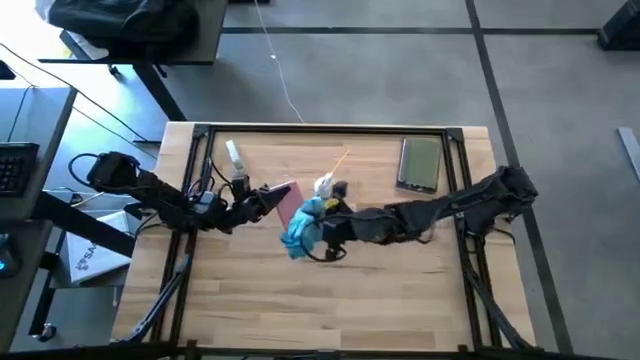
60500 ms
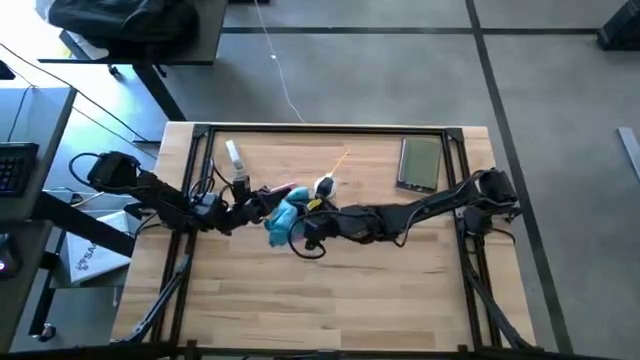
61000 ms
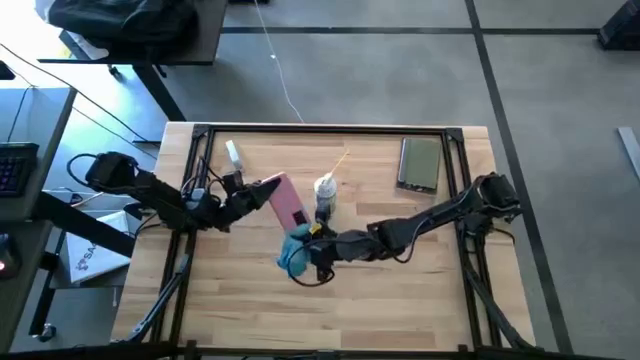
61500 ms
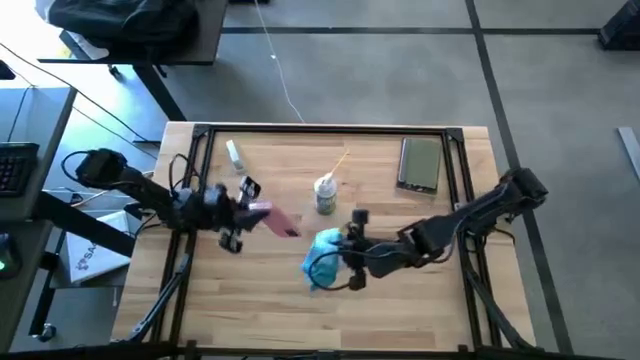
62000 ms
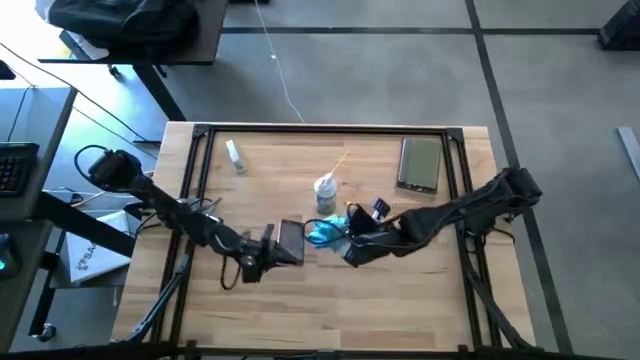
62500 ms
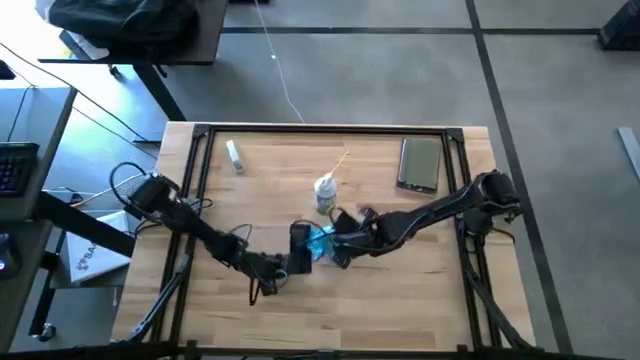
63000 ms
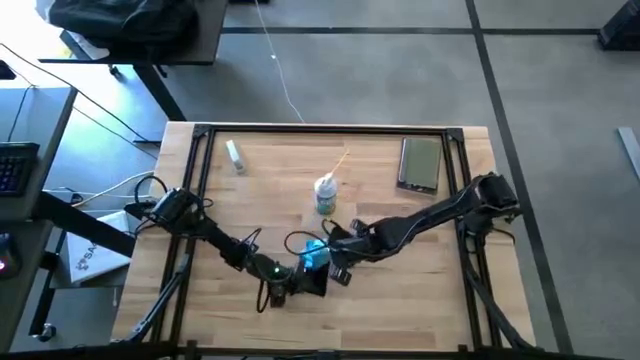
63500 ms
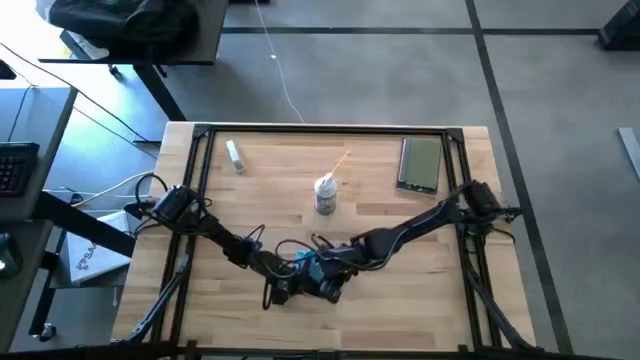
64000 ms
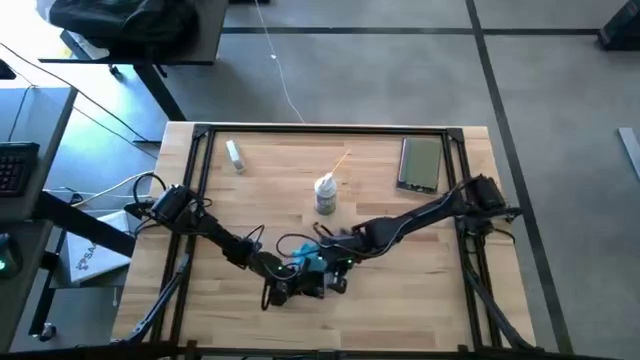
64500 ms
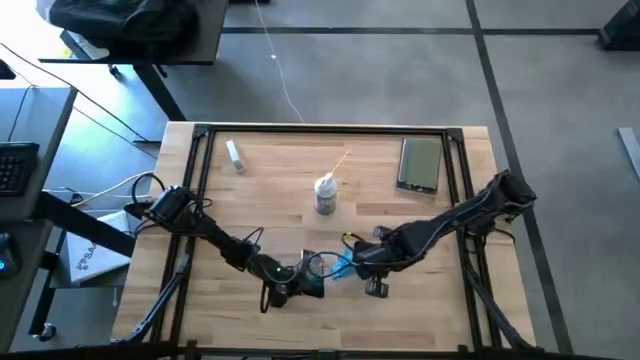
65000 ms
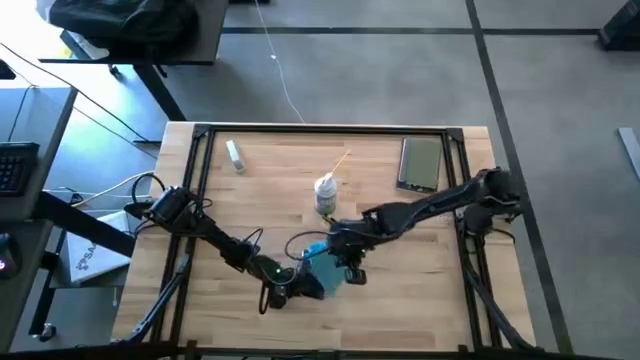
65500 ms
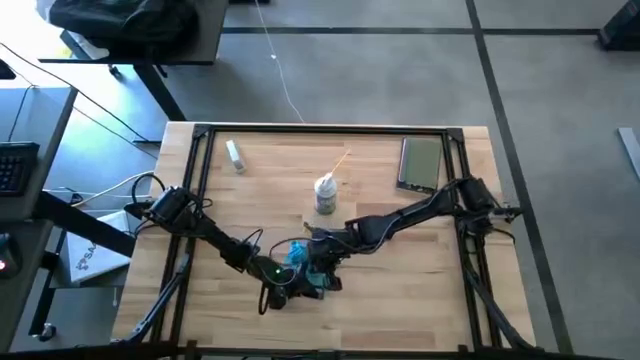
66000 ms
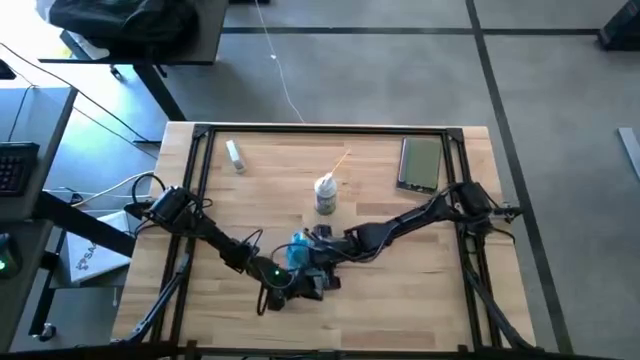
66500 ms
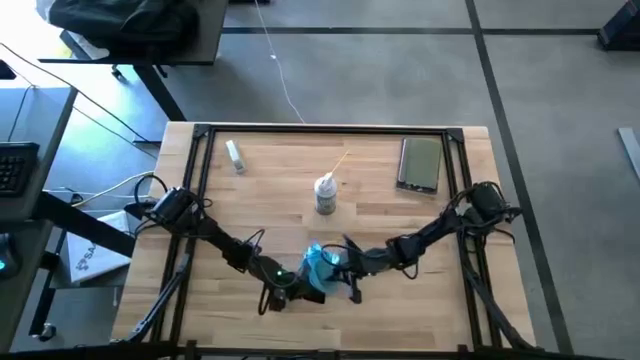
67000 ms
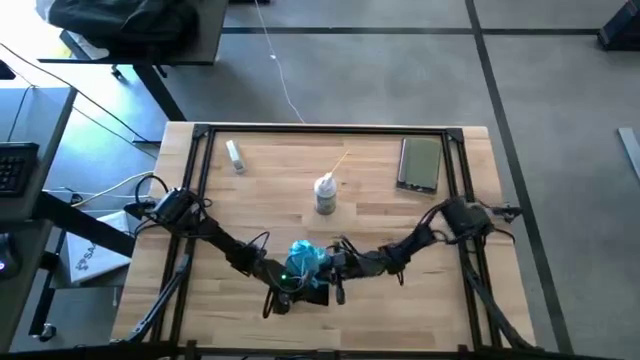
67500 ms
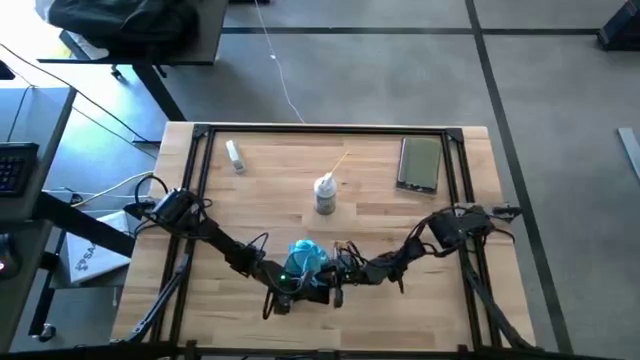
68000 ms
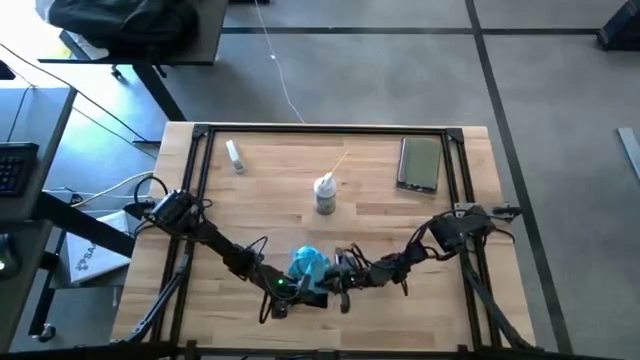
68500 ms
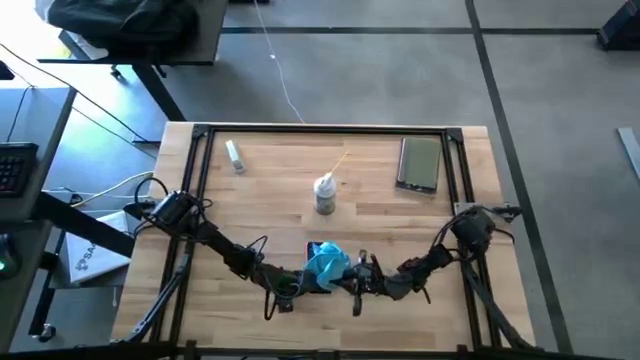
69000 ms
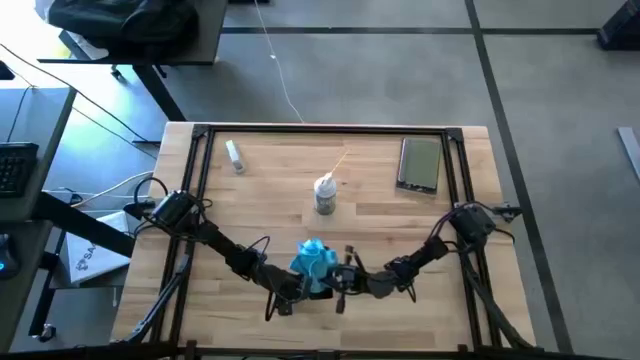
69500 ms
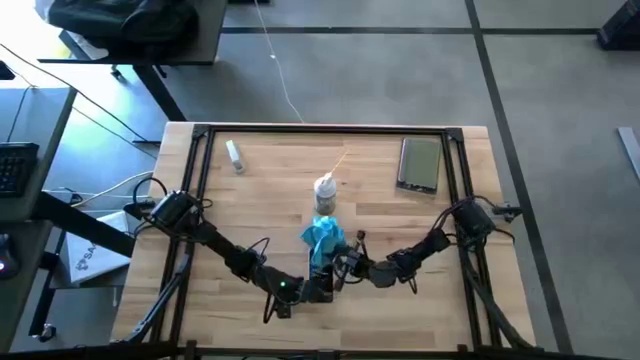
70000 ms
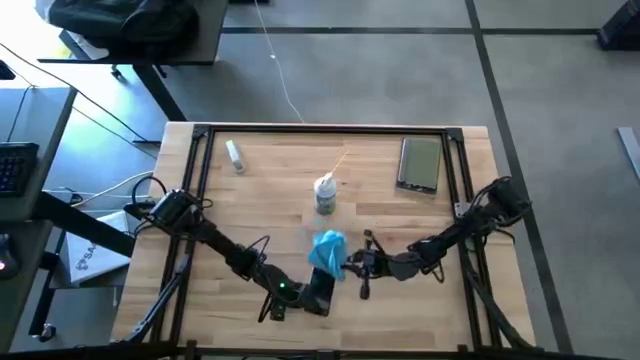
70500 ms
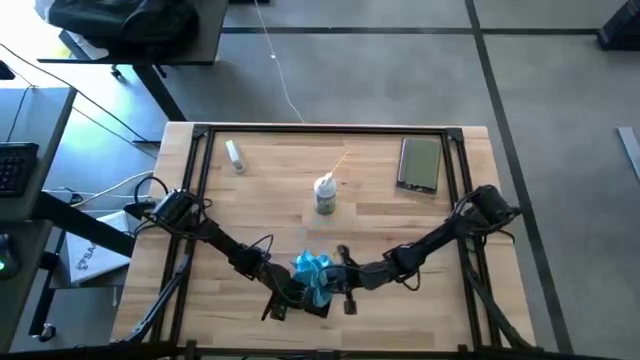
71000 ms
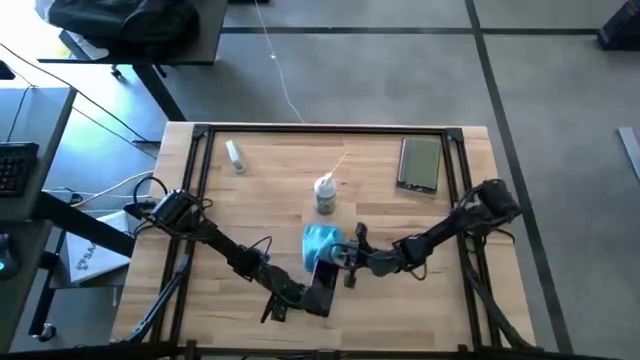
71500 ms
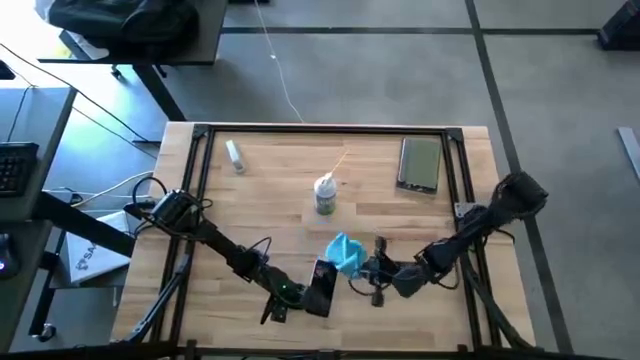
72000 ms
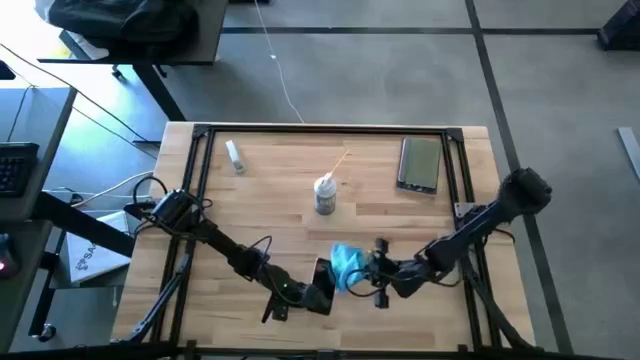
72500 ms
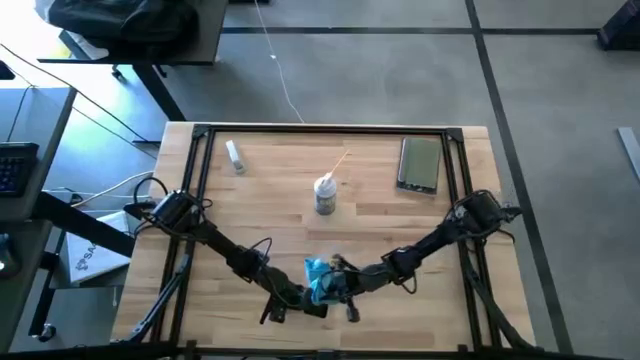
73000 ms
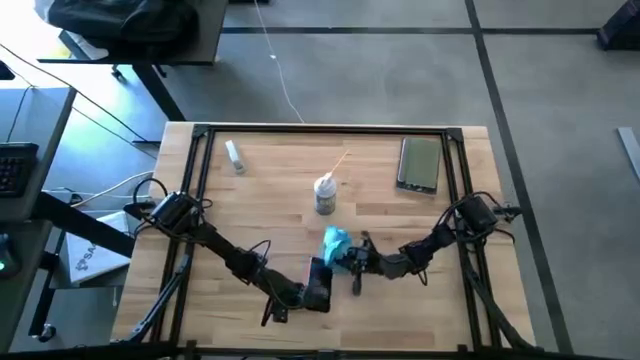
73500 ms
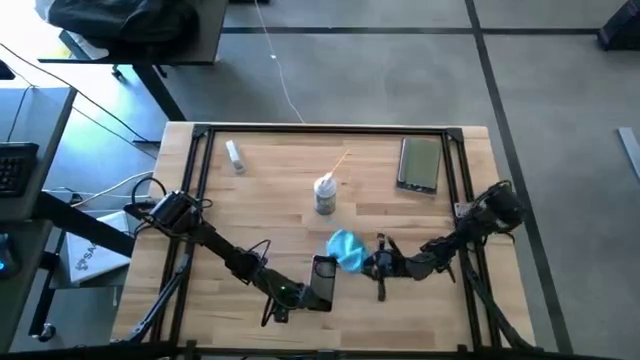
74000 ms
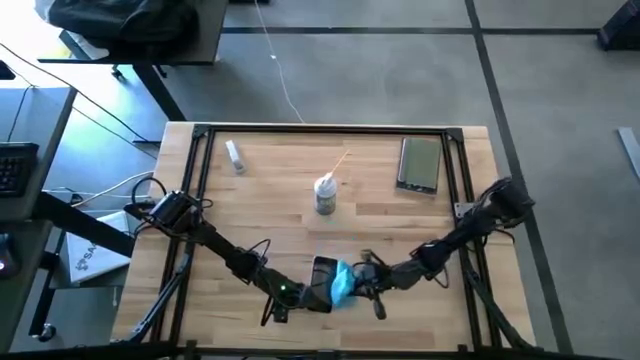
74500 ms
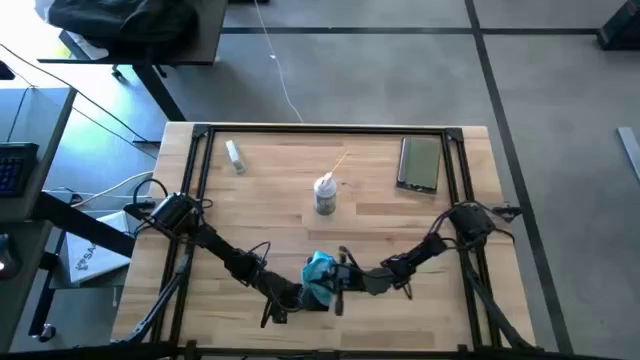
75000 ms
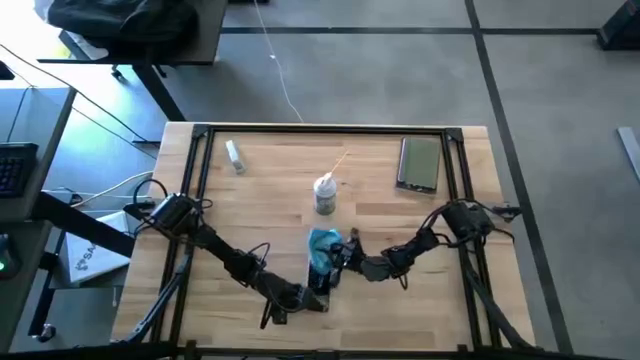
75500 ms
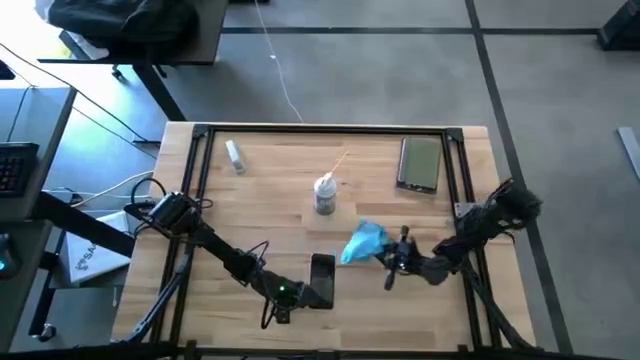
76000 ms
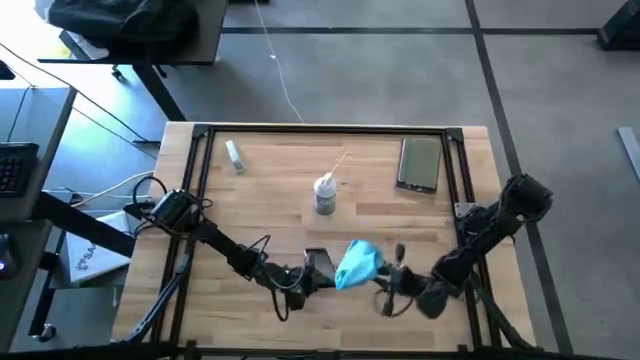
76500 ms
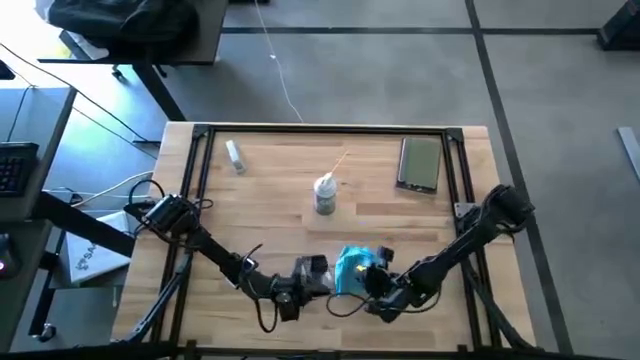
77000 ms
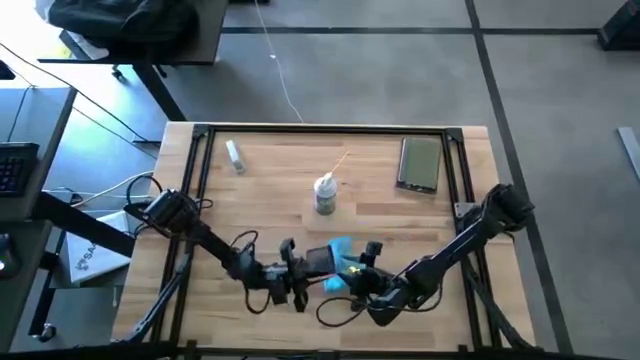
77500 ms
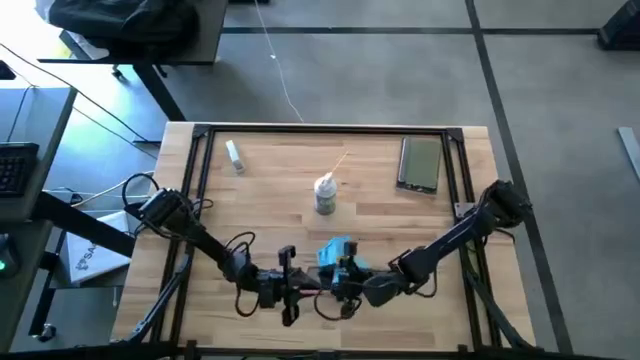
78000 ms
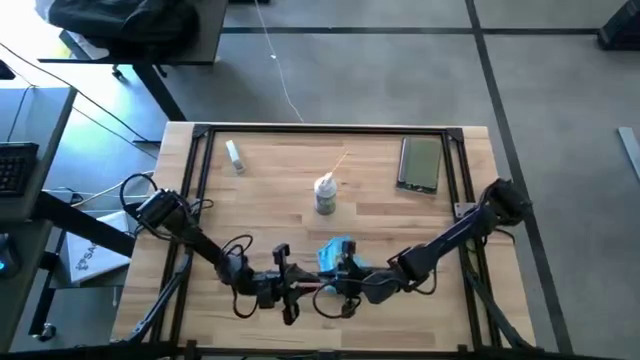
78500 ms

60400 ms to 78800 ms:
Task: Apply microfiber cloth
Wipe the back and front of the cellphone with the blue microfiber cloth

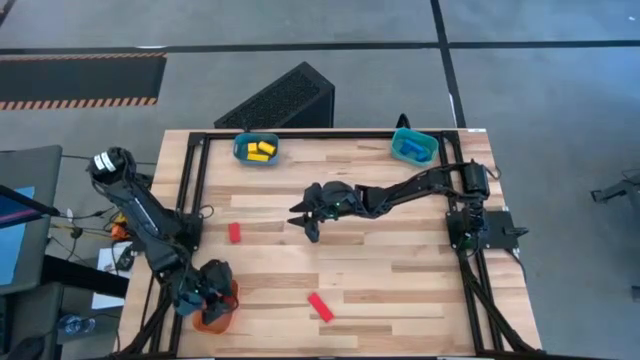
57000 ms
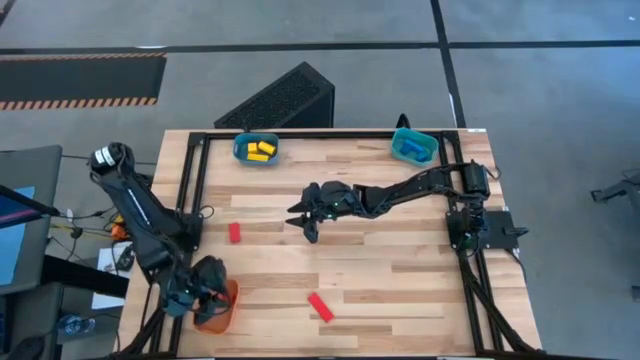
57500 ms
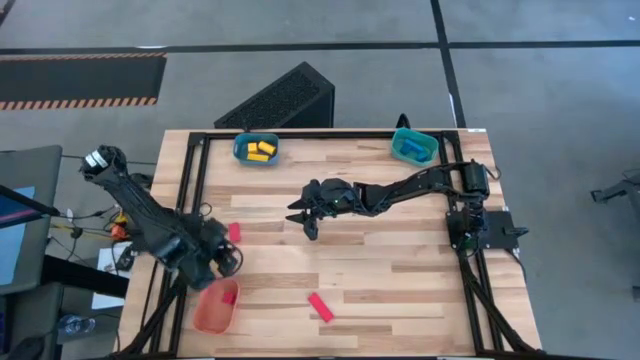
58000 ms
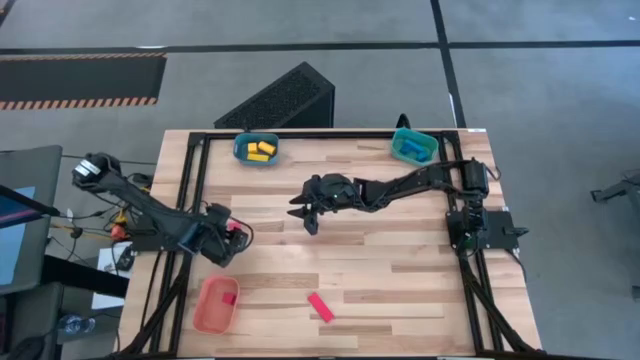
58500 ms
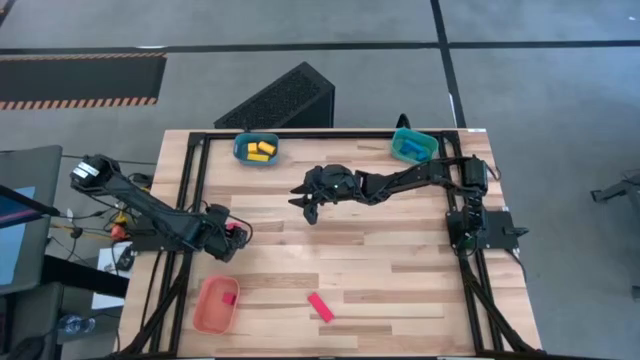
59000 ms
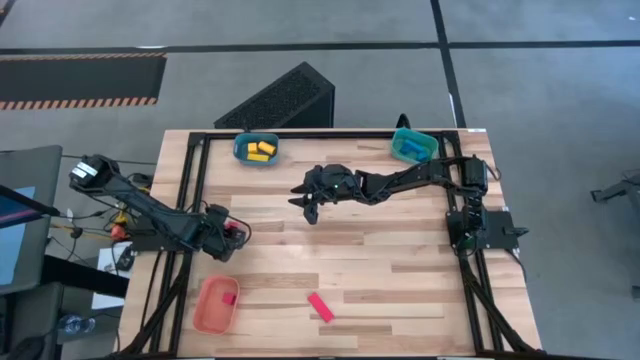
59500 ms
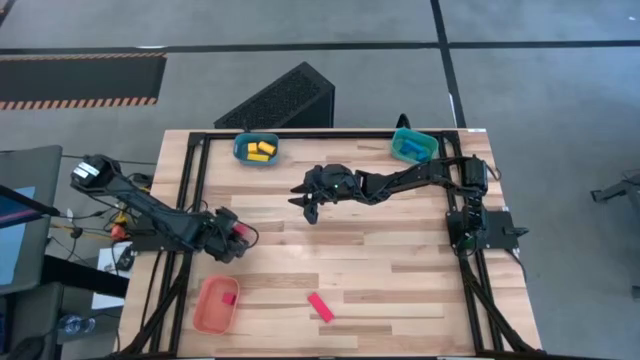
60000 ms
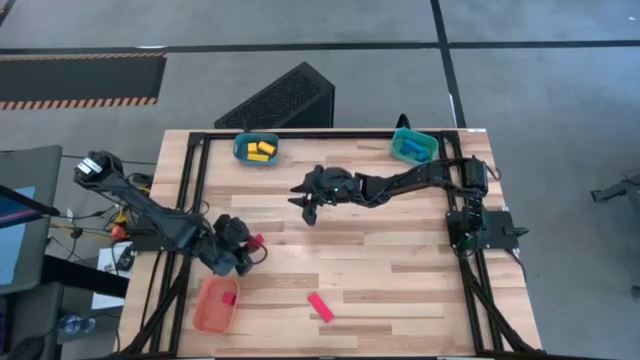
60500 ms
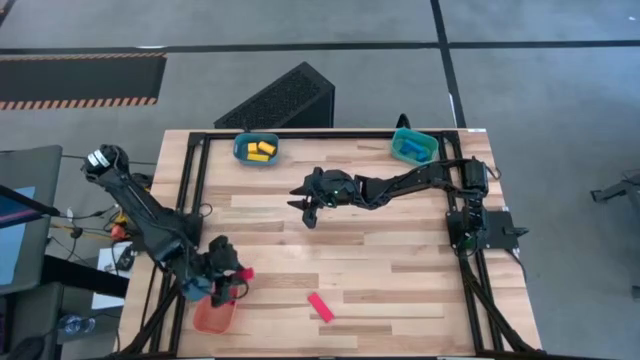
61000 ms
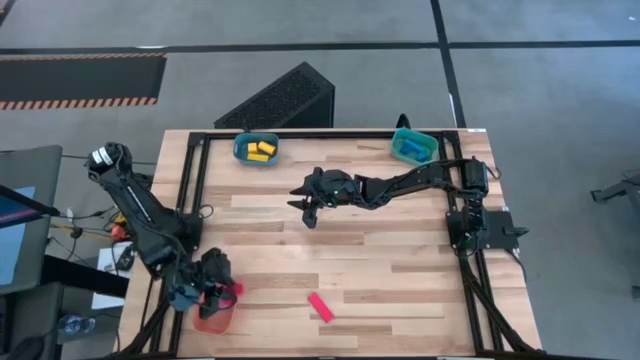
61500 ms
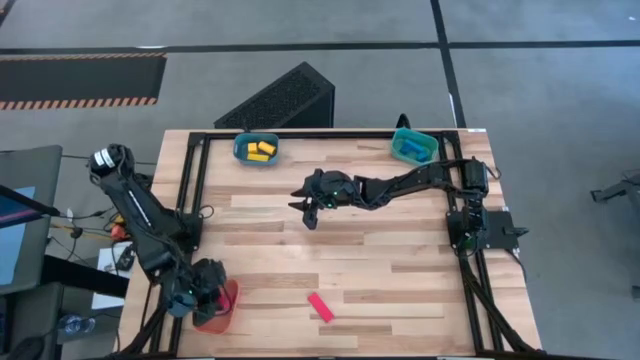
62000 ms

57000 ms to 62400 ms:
Task: Sort & place blocks by color
Put the left red block into the orange bin
